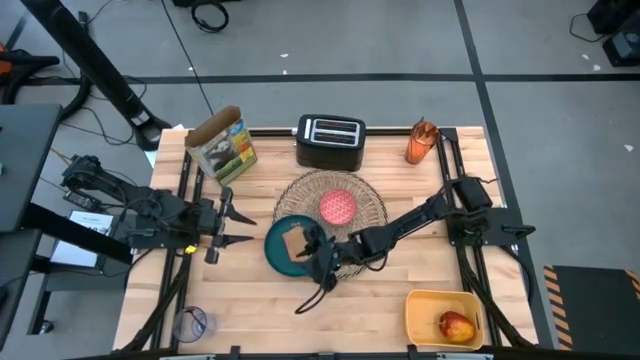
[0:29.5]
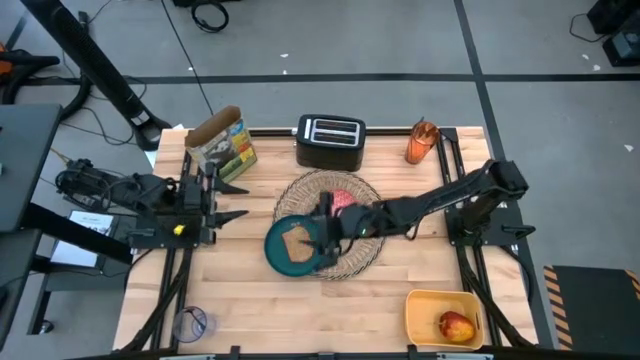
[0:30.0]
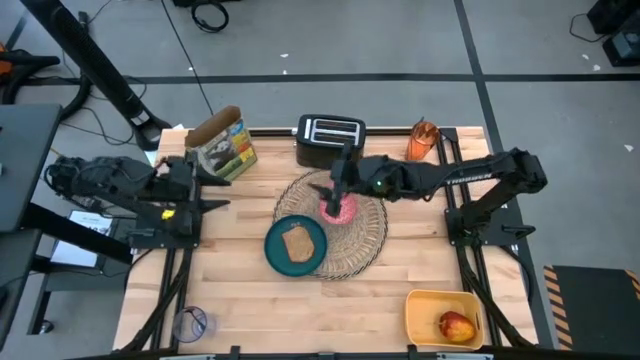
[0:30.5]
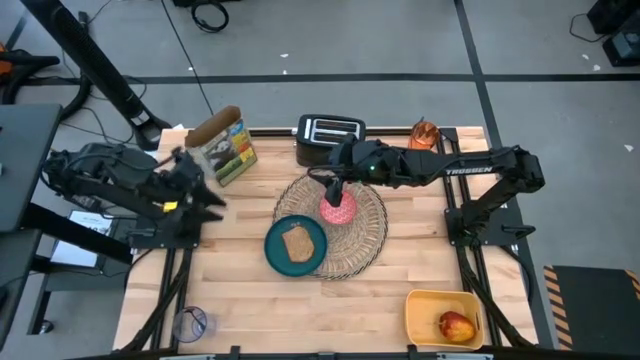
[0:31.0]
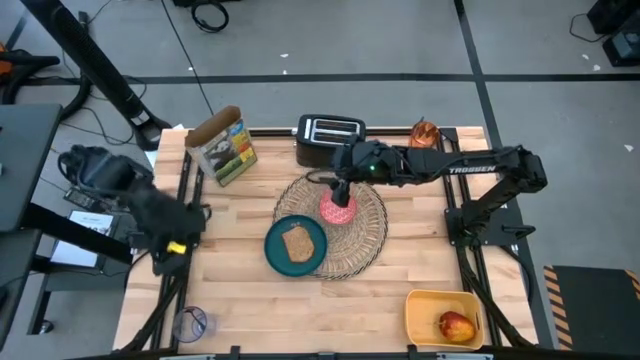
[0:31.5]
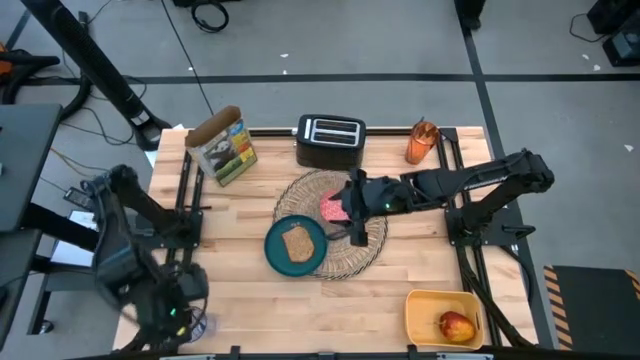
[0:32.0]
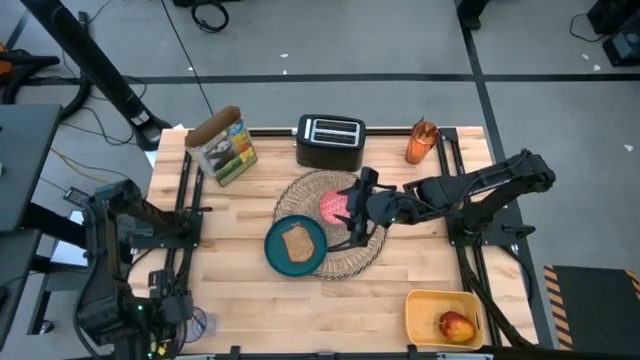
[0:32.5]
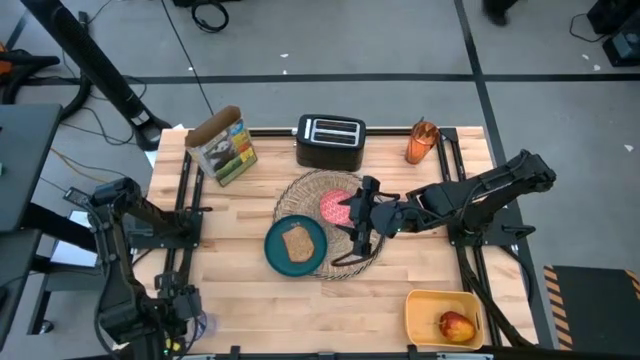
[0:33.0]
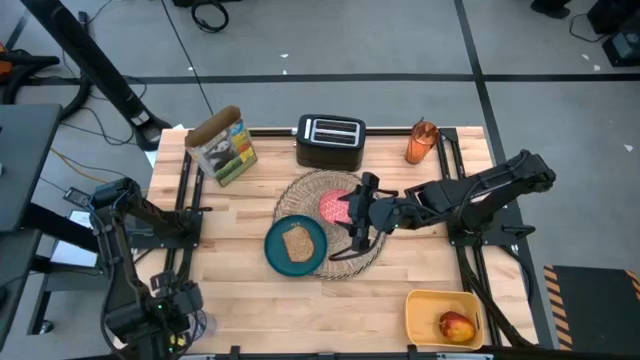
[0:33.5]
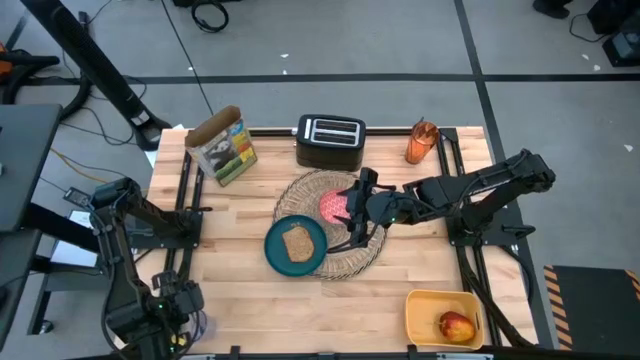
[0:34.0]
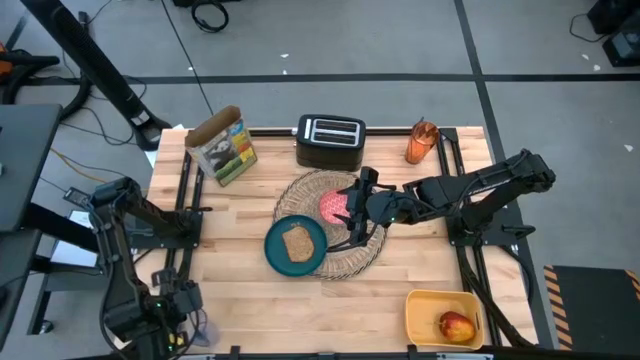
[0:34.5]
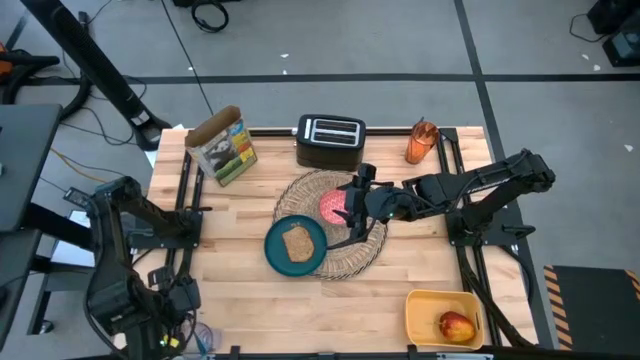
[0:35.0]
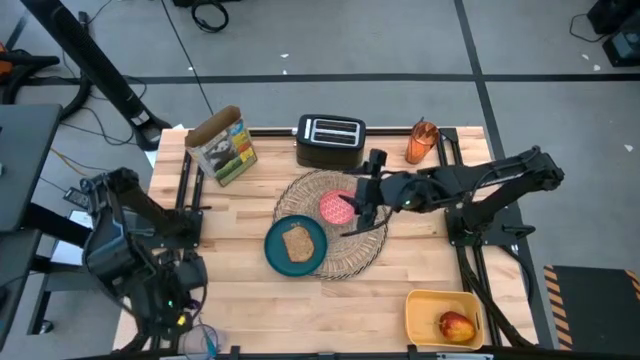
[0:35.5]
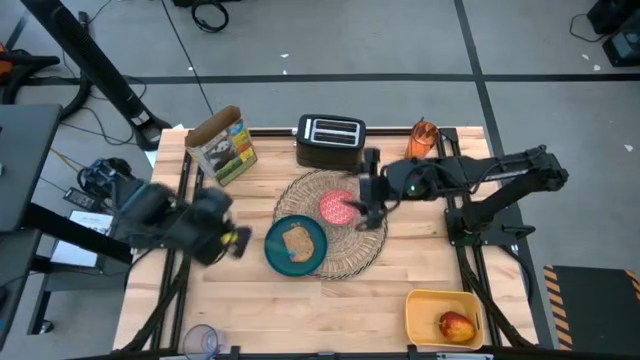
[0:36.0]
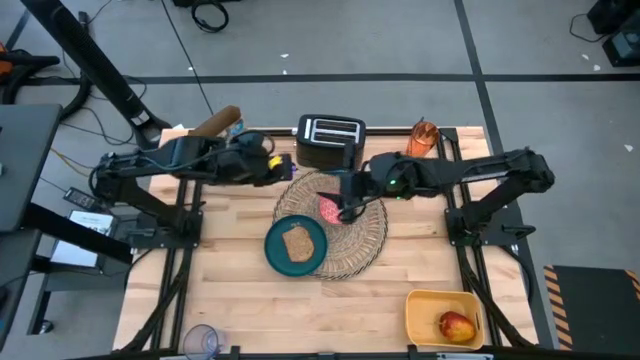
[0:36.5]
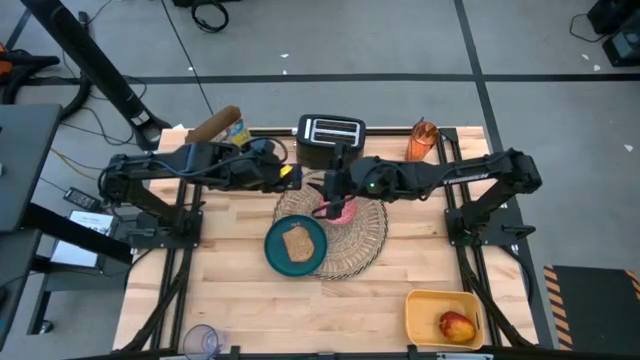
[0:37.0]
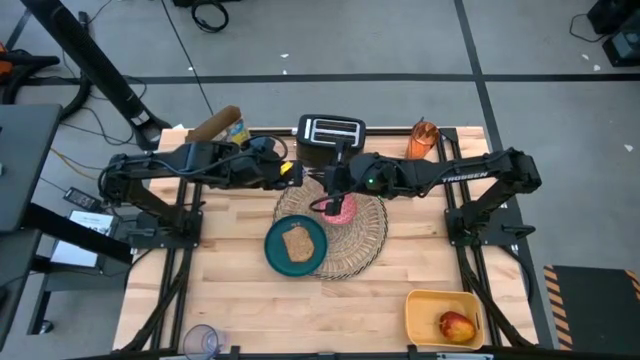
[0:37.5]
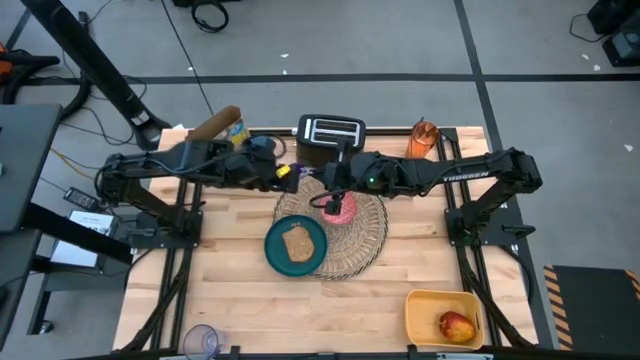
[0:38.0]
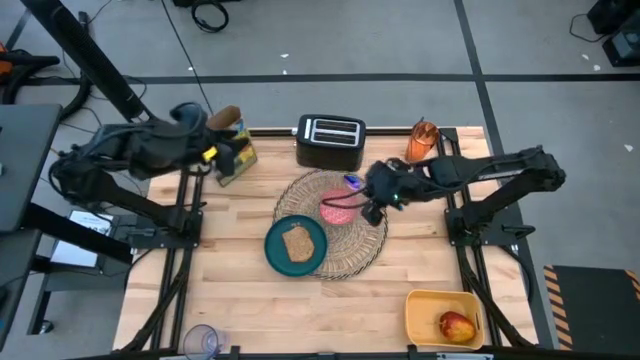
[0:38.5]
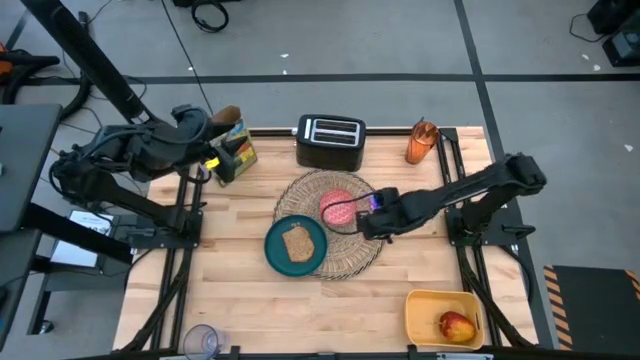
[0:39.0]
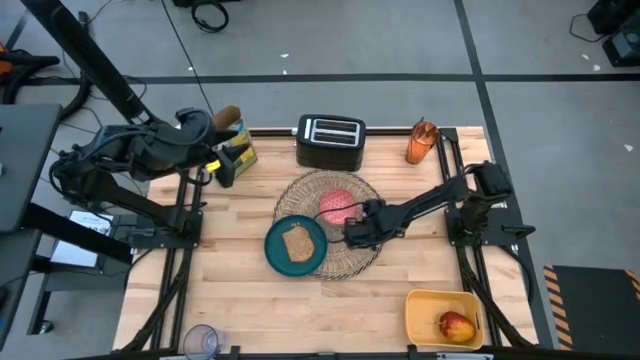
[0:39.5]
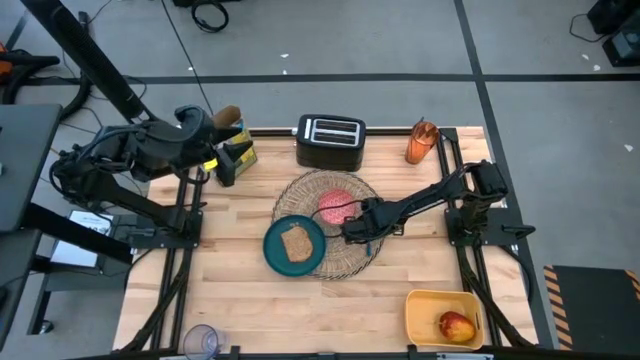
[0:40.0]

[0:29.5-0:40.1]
Task: Arrange a breakfast setting
Put the spoon on the place mat

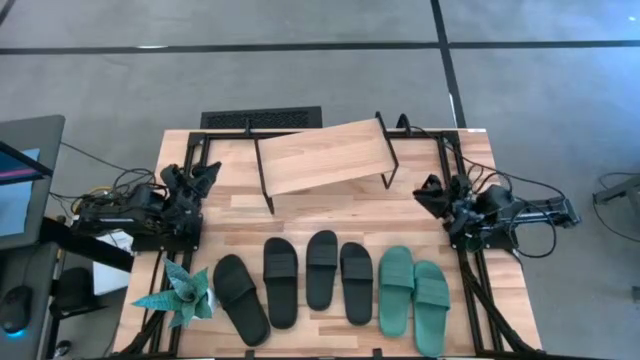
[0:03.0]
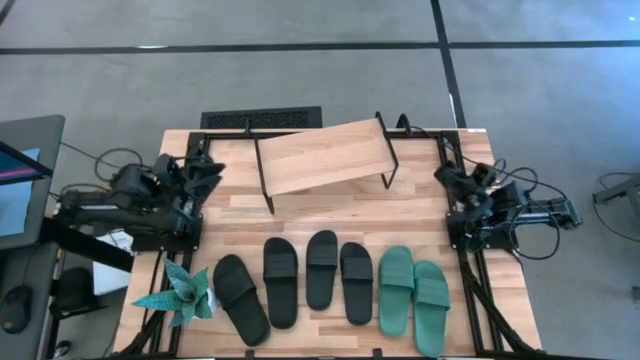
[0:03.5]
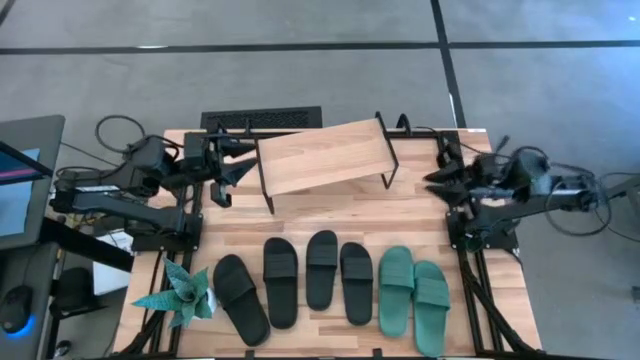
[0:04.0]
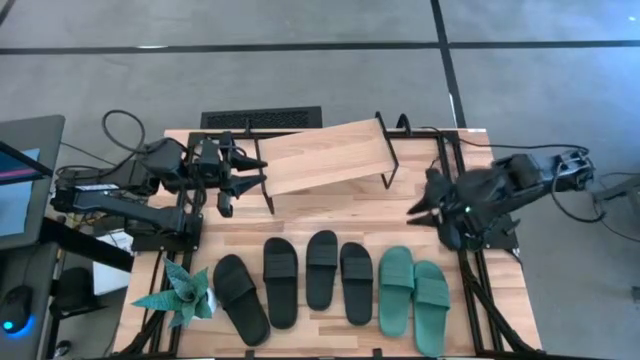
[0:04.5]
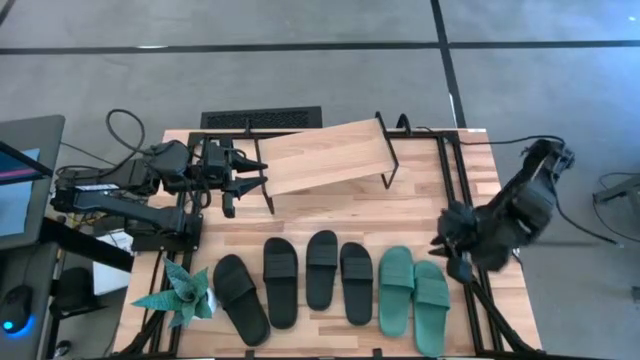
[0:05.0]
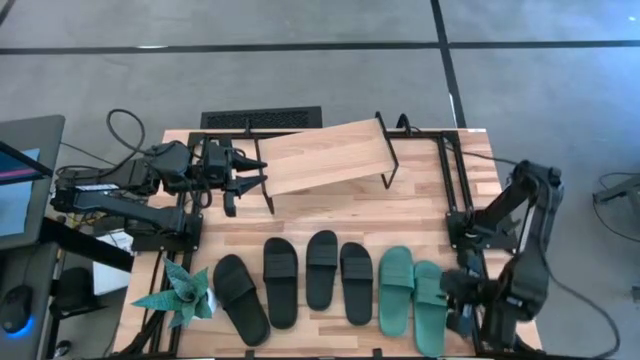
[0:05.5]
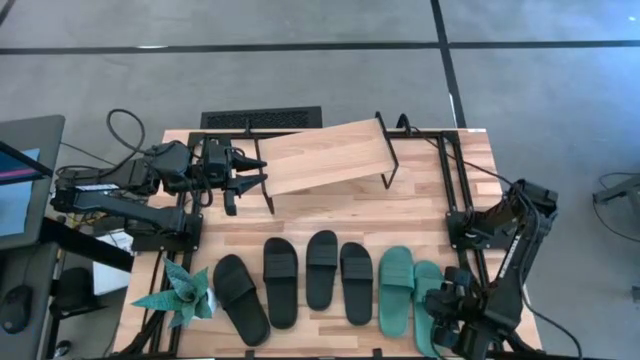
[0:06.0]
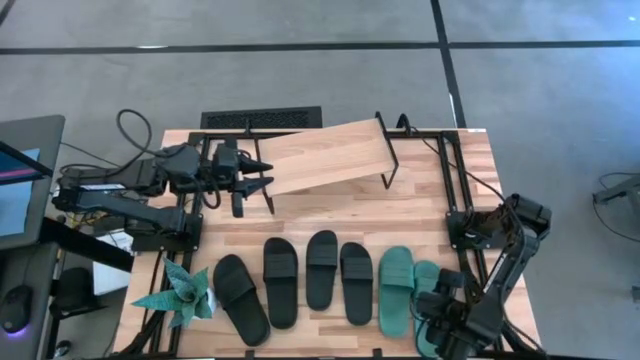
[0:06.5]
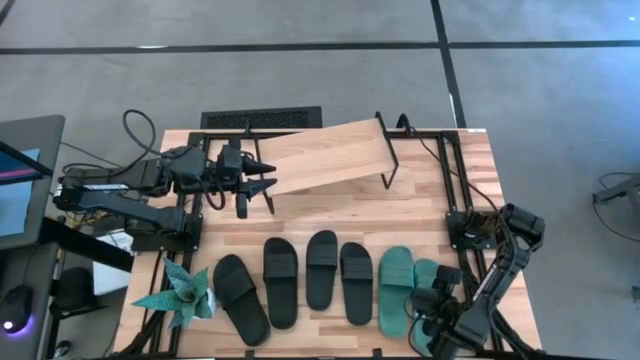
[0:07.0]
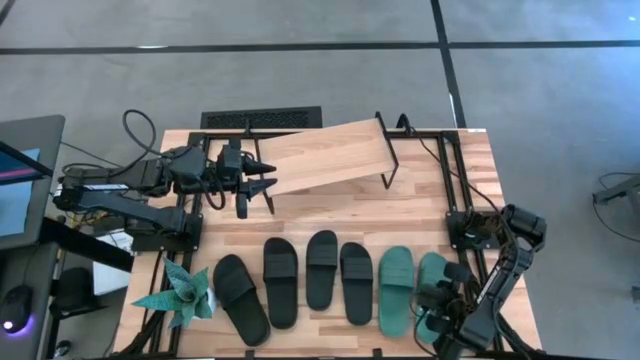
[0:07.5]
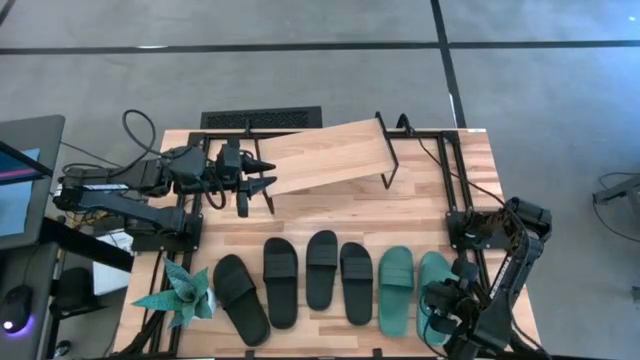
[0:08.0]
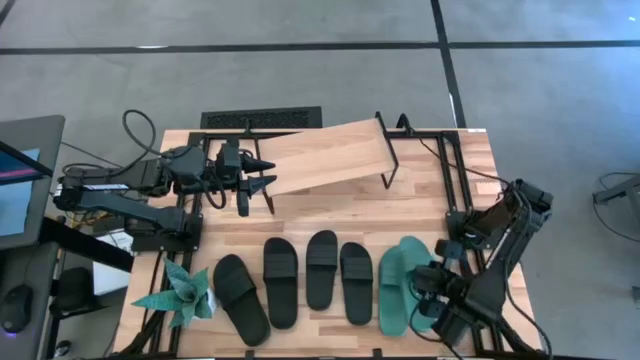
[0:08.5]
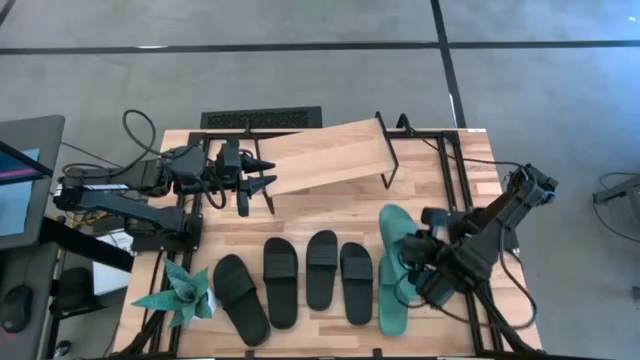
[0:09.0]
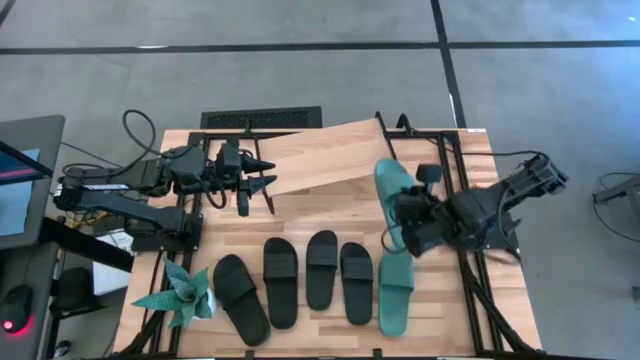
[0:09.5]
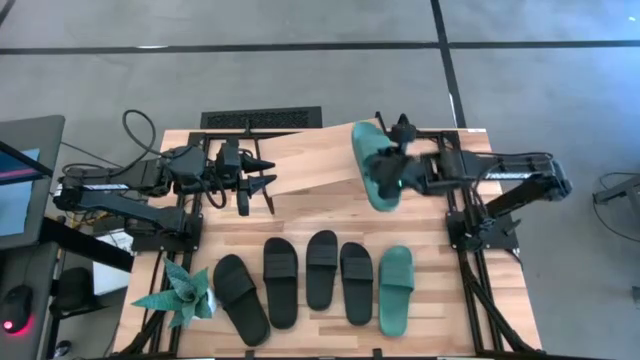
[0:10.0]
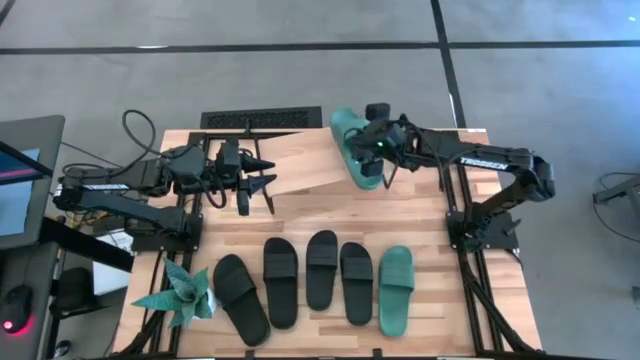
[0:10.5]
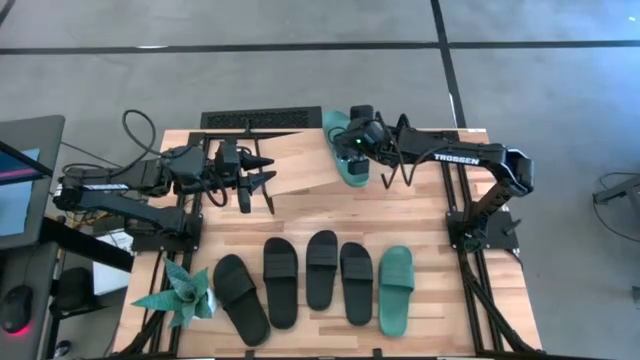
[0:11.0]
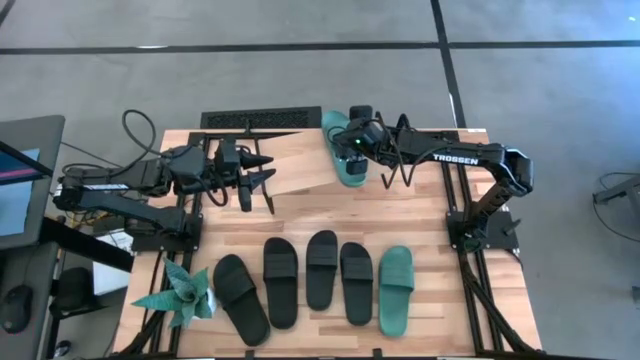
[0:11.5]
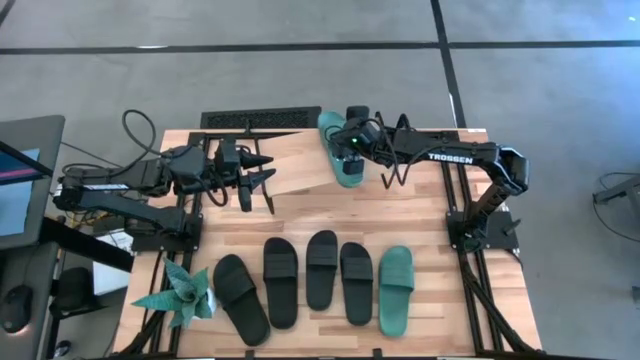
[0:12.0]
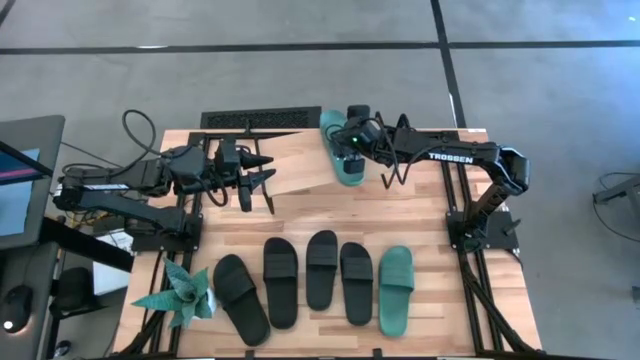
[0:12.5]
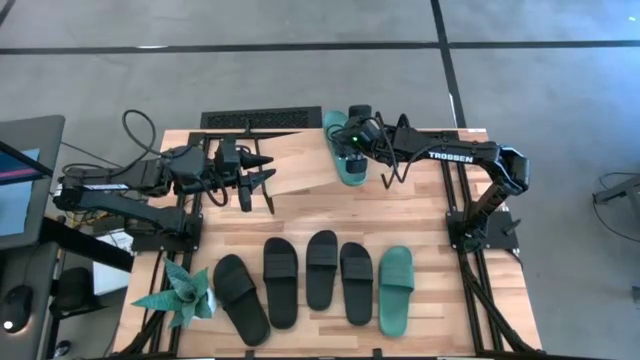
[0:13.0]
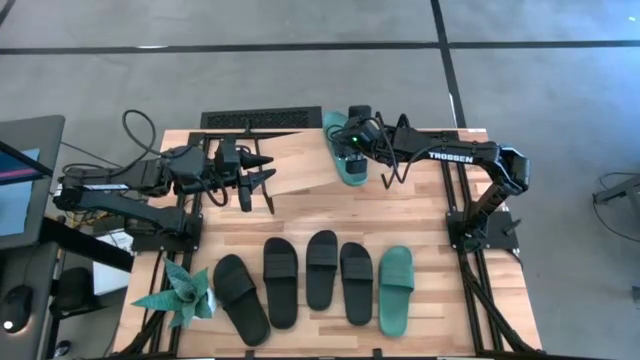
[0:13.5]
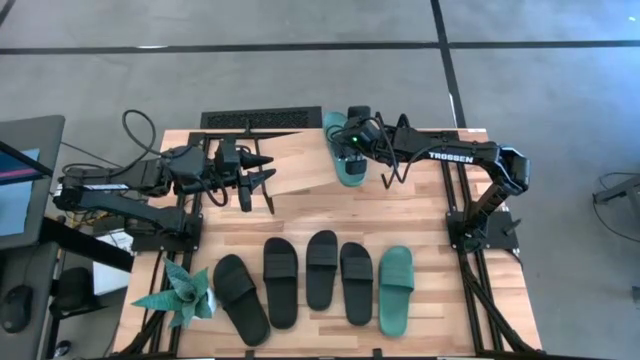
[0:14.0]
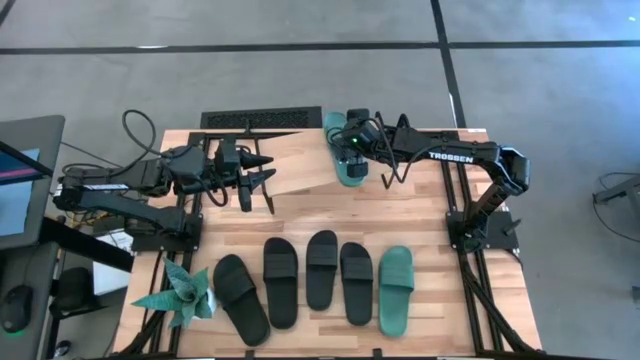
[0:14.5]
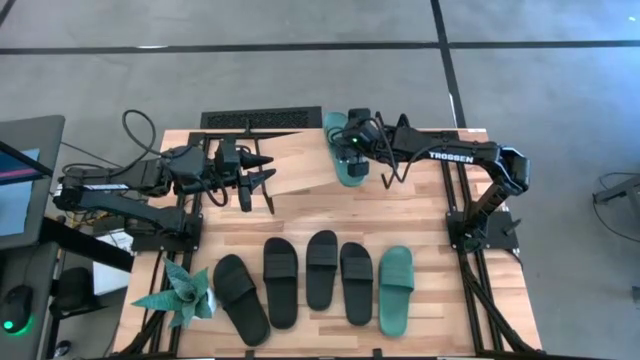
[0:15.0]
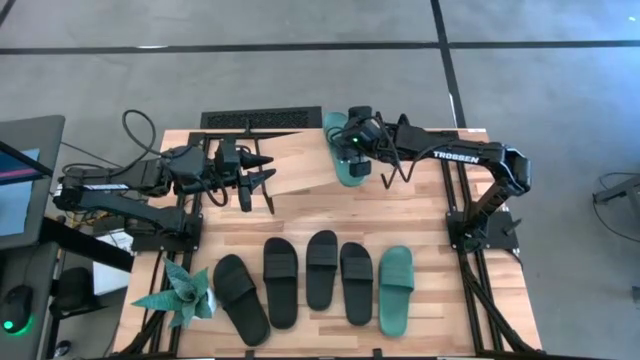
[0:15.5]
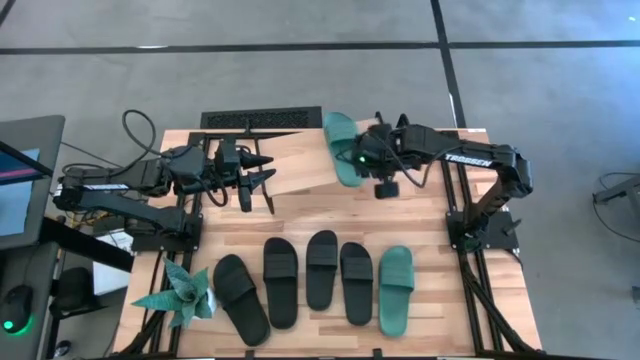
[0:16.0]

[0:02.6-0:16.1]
Task: Pick and place slides into the shelf
Put the right green slide on the shelf
